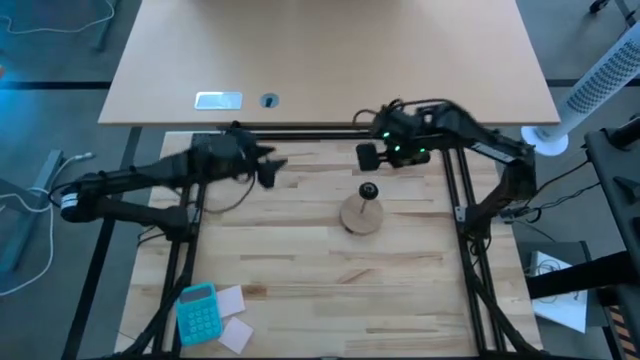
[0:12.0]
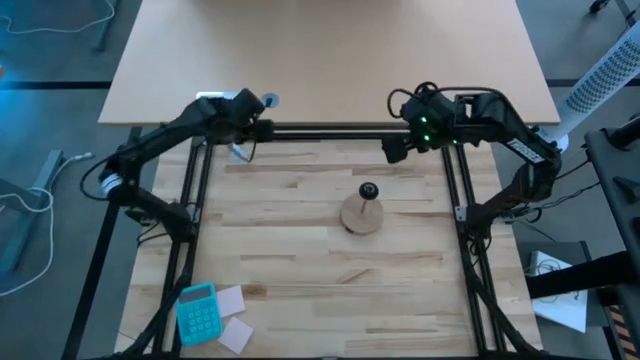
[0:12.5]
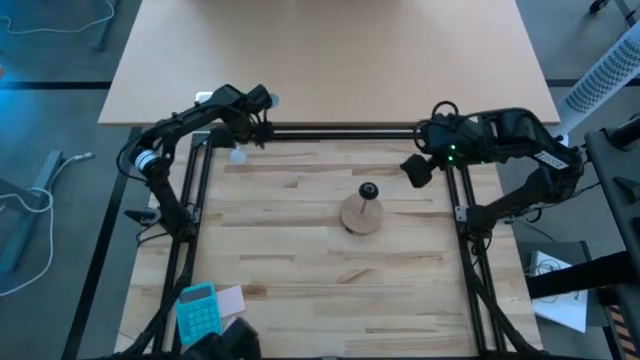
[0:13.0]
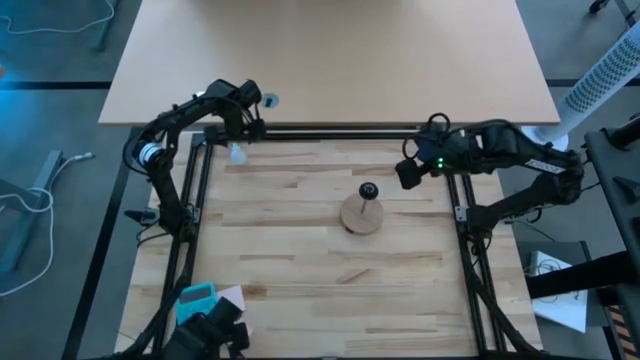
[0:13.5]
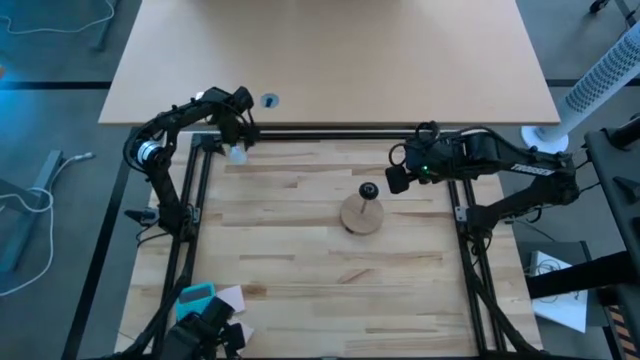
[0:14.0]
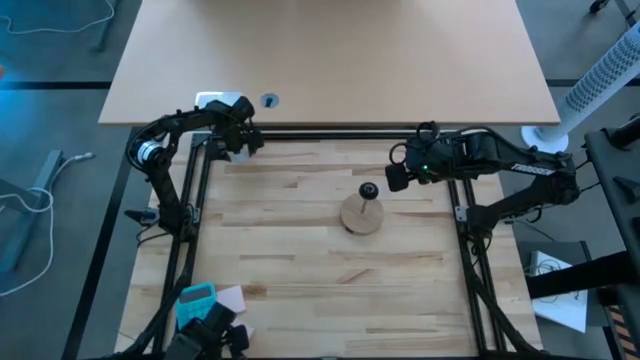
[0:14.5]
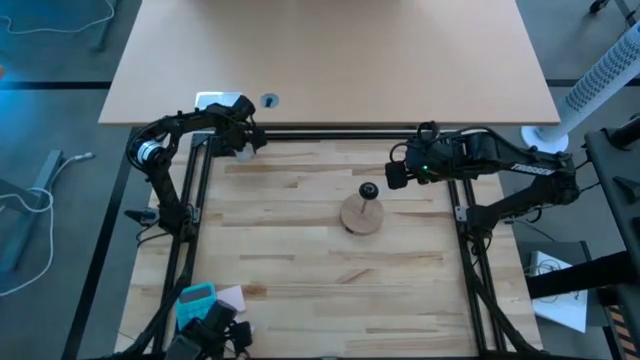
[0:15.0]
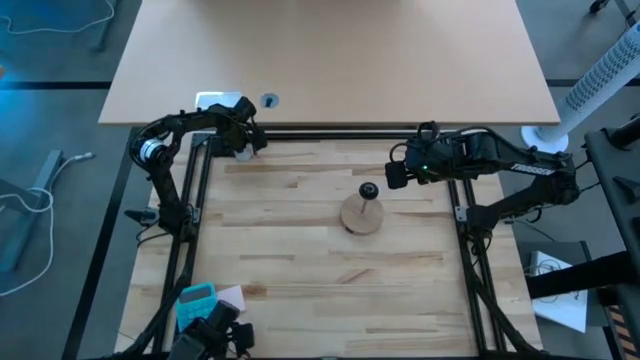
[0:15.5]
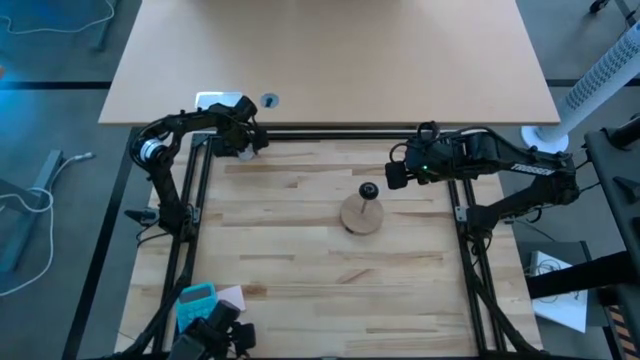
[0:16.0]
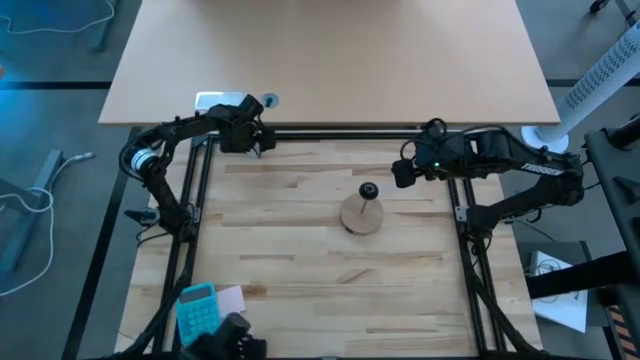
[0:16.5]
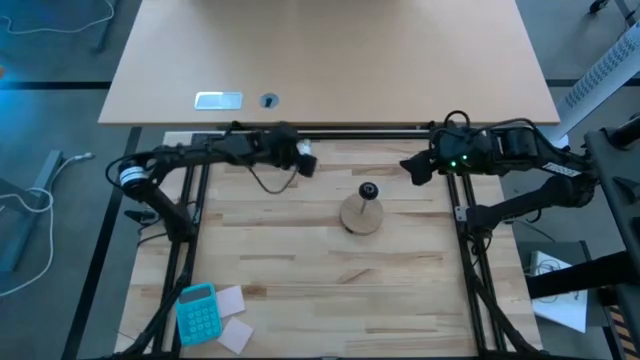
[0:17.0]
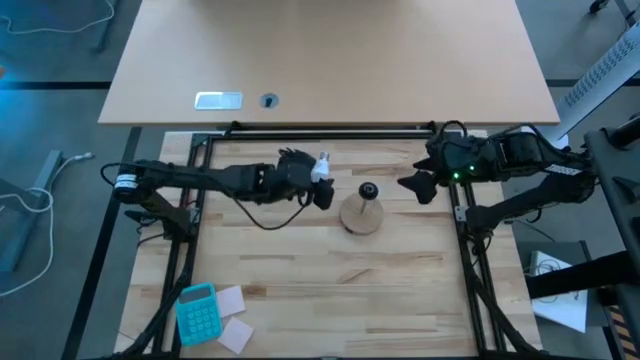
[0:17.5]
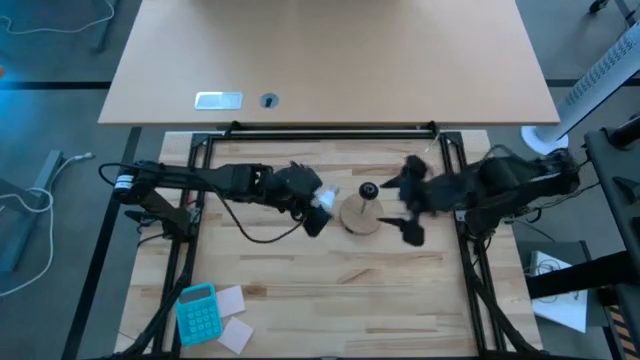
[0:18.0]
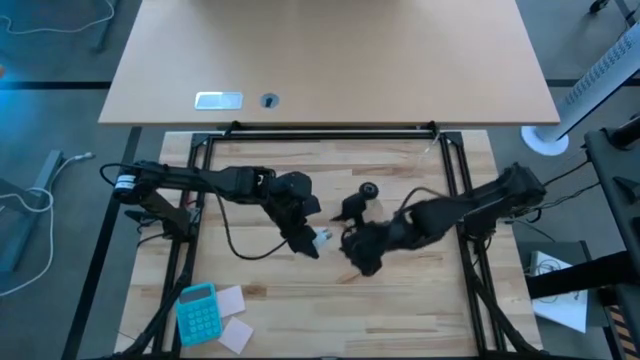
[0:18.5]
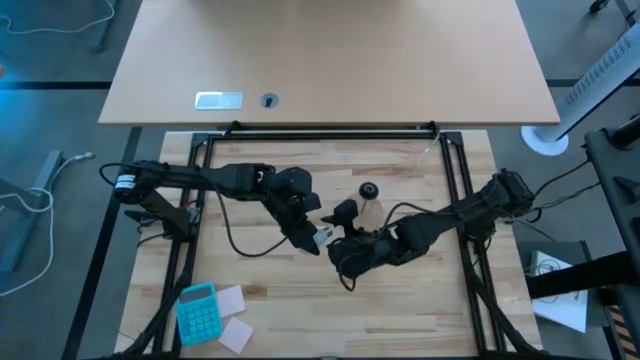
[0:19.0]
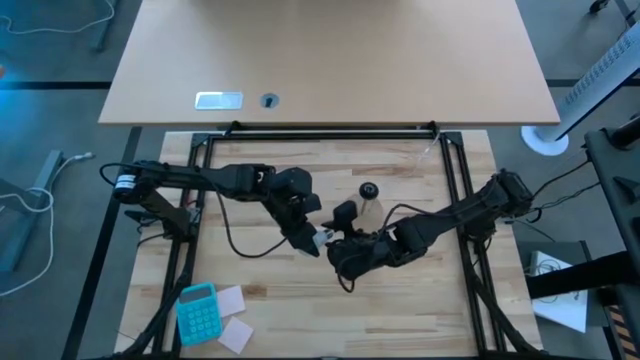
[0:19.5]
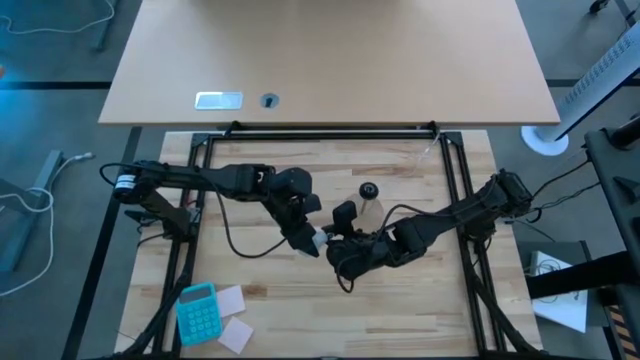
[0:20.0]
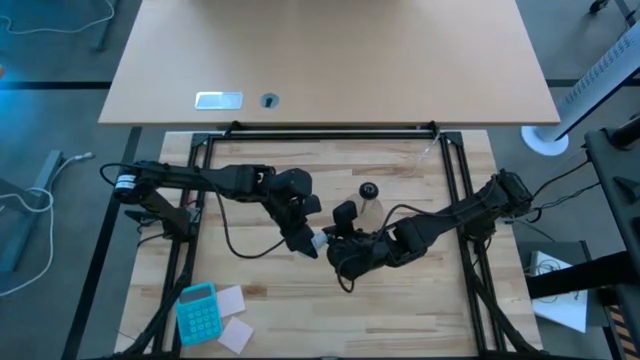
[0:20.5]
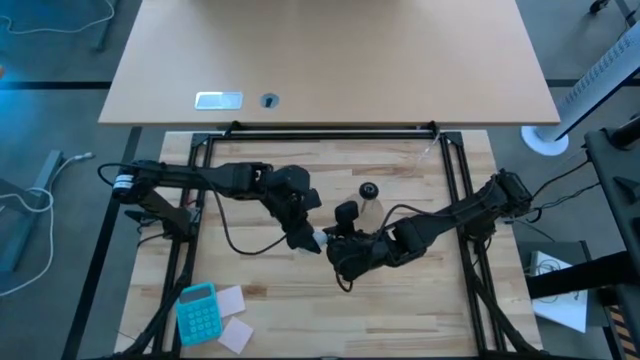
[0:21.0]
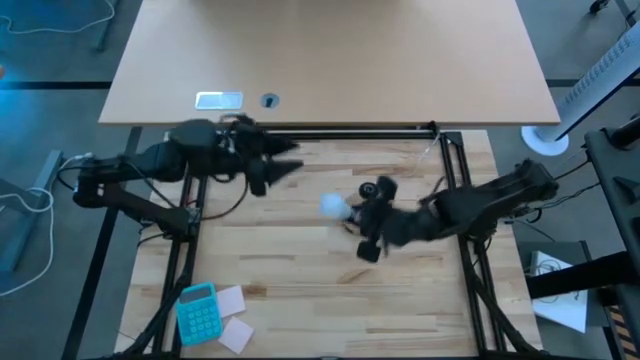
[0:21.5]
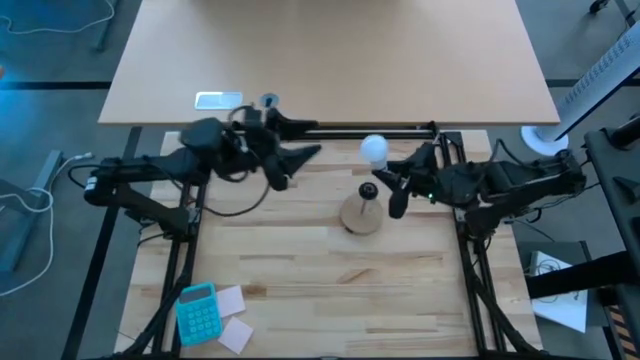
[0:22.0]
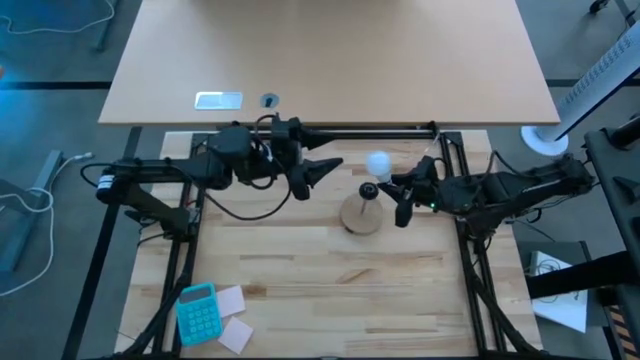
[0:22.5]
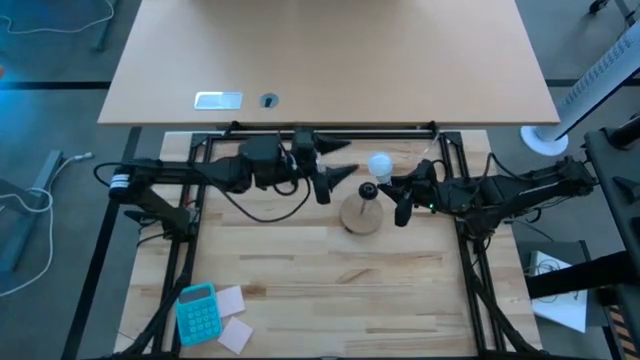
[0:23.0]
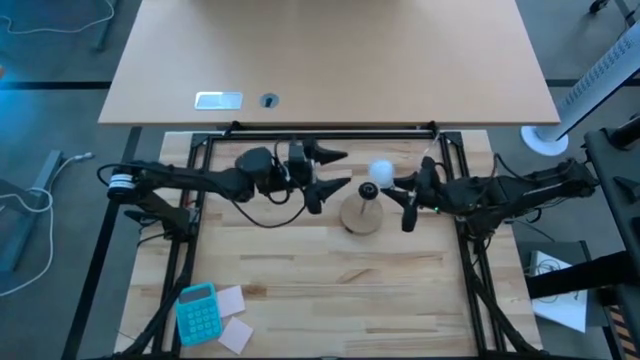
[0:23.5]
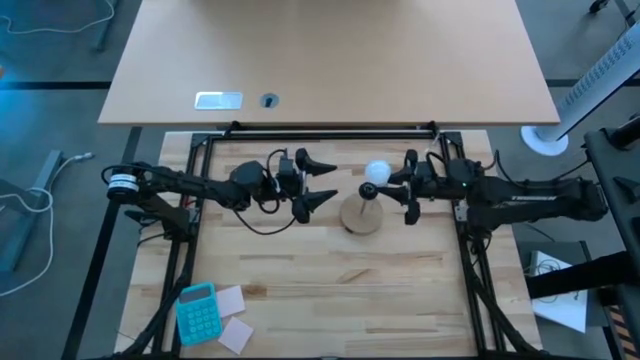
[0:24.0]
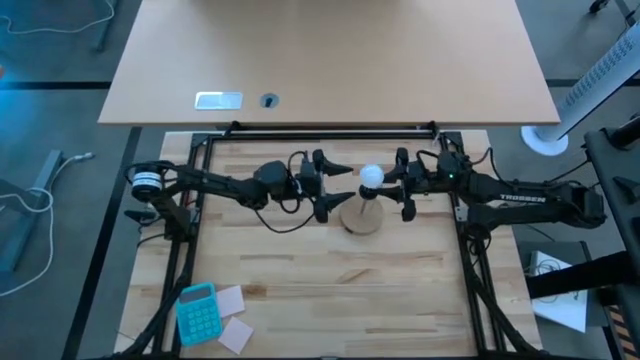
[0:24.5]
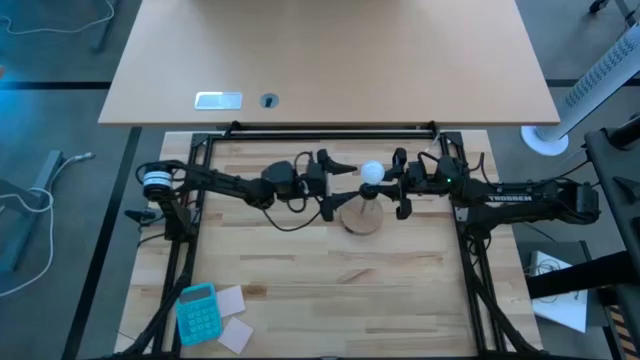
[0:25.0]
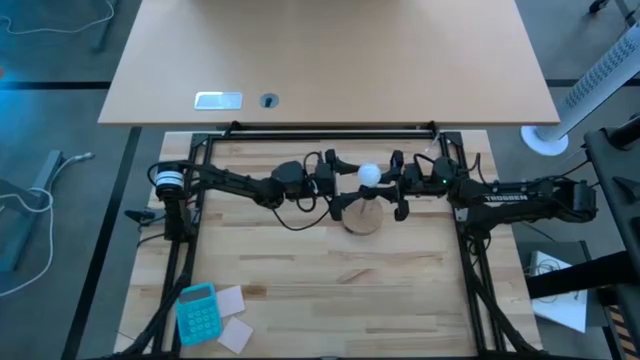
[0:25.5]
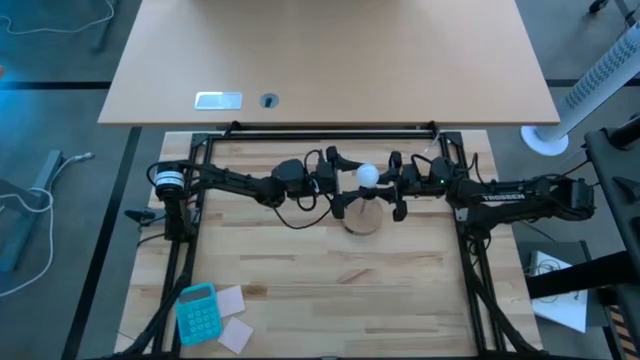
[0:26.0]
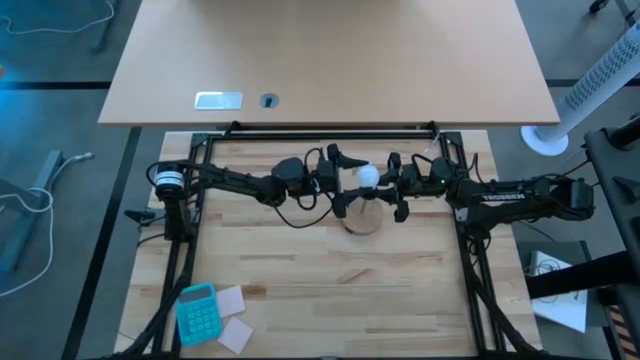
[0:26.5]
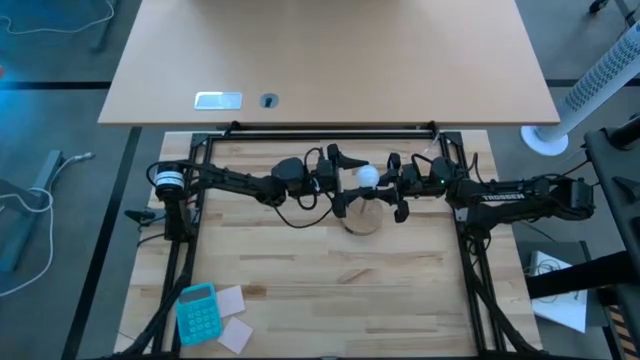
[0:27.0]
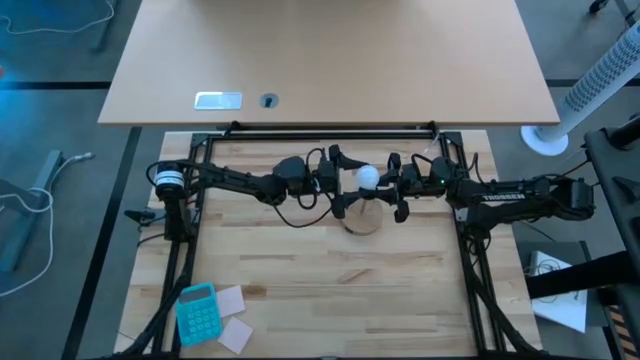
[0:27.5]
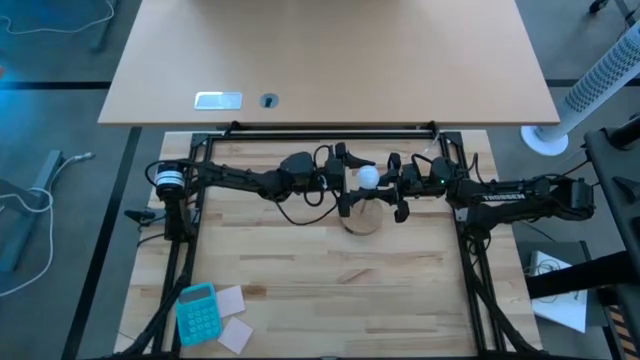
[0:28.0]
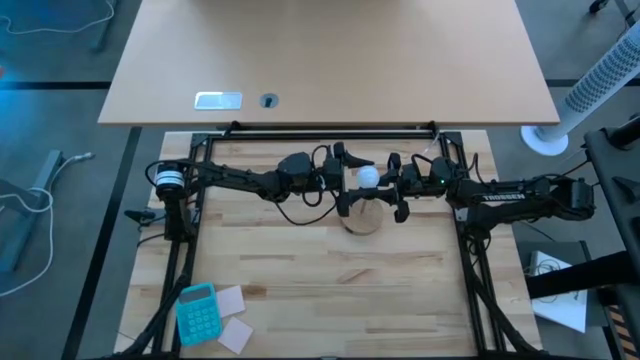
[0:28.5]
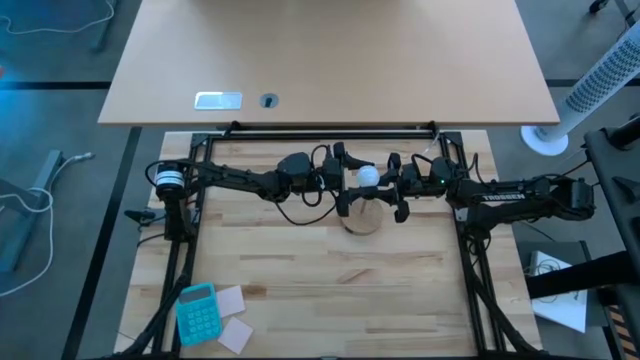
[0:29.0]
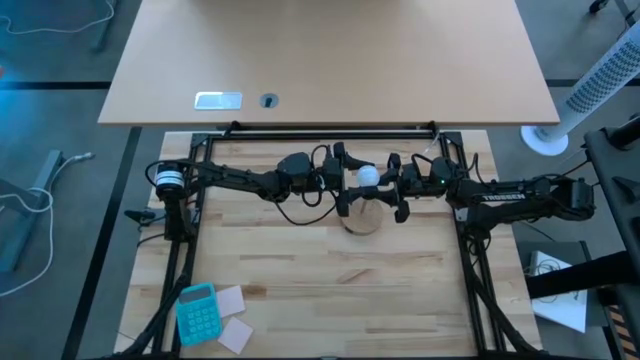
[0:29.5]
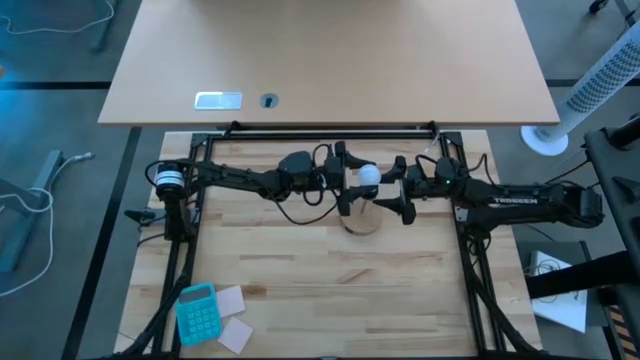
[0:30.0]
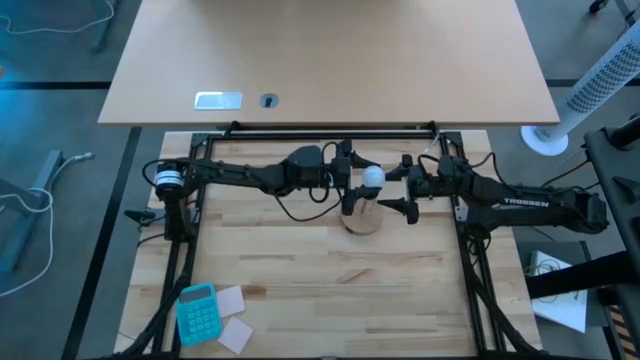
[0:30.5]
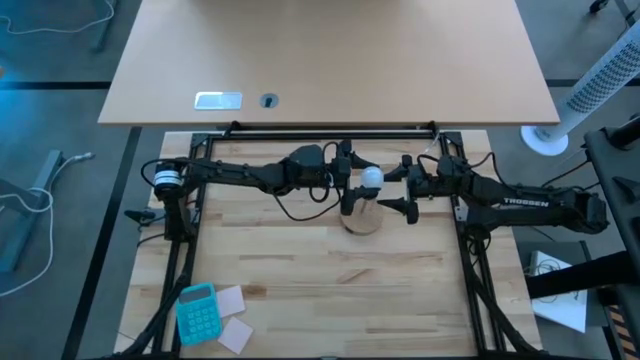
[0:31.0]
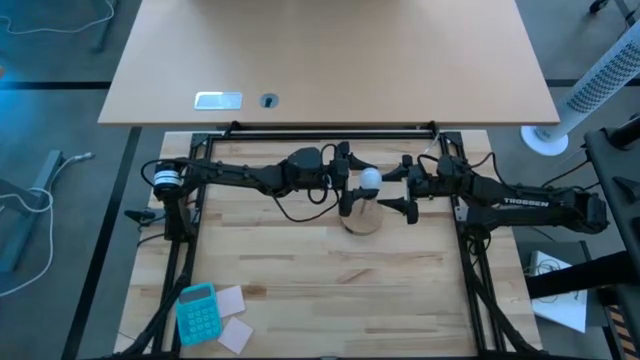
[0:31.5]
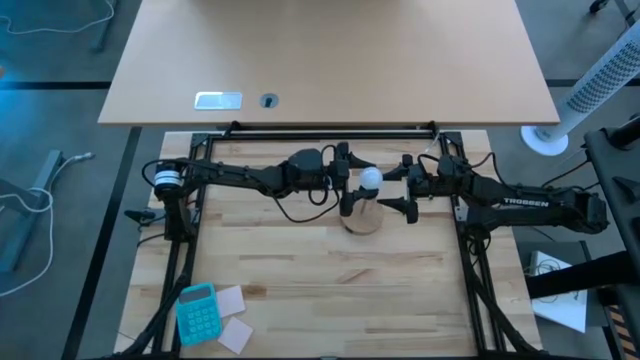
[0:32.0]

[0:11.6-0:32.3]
Task: Screw lightbulb
Insert the lightbulb into the lamp
